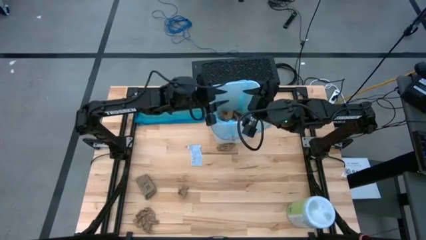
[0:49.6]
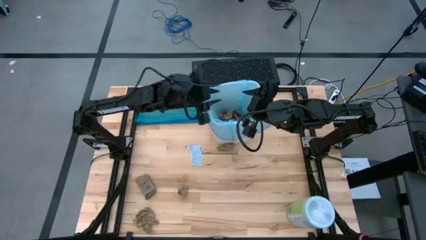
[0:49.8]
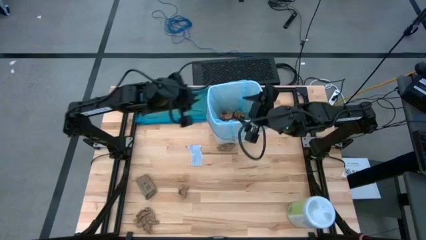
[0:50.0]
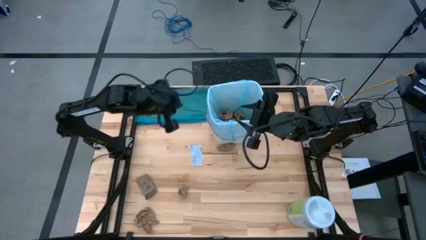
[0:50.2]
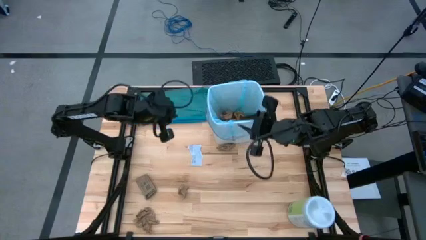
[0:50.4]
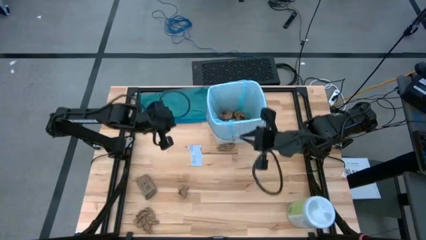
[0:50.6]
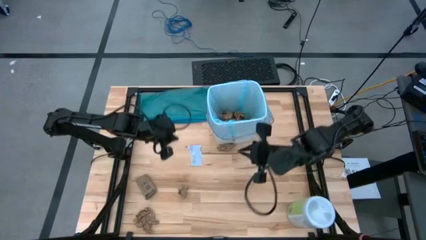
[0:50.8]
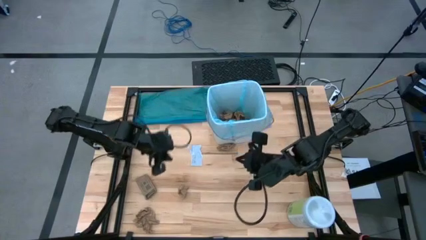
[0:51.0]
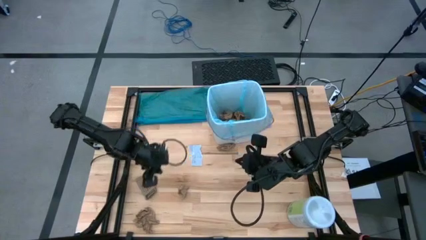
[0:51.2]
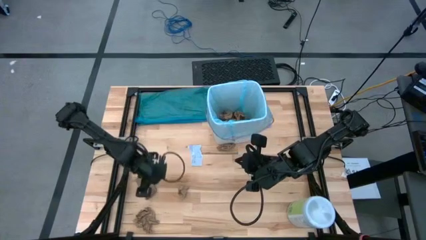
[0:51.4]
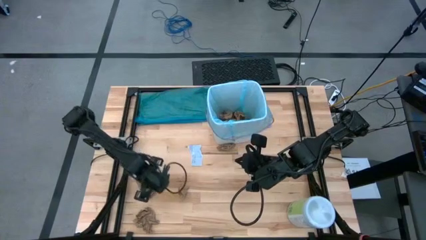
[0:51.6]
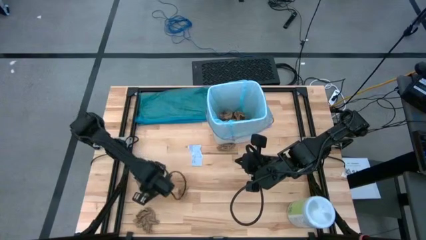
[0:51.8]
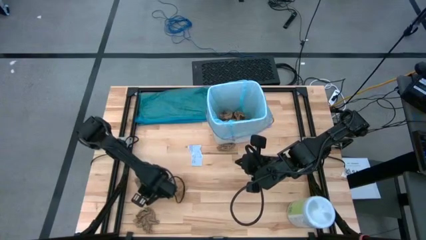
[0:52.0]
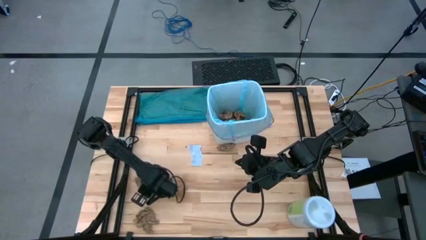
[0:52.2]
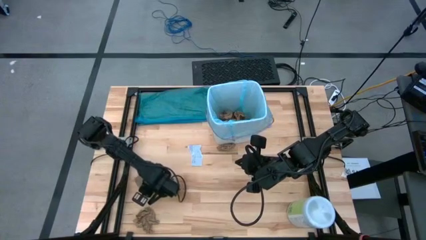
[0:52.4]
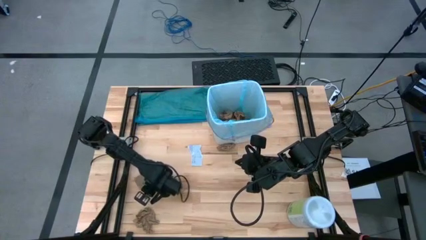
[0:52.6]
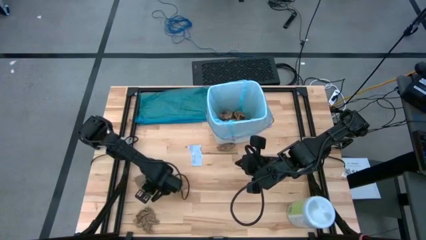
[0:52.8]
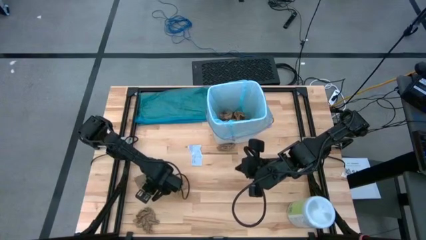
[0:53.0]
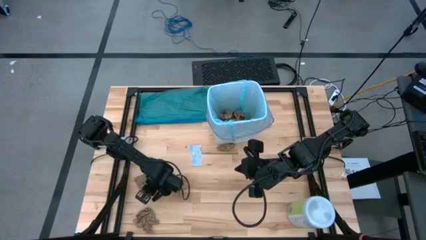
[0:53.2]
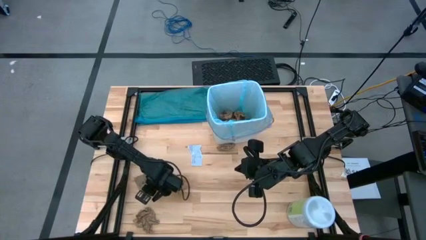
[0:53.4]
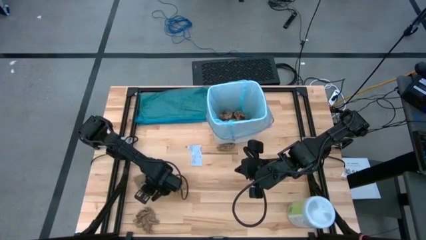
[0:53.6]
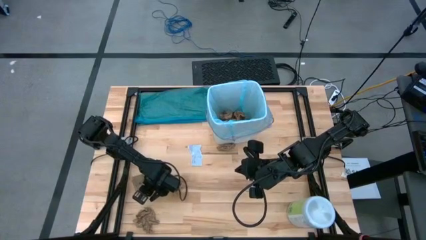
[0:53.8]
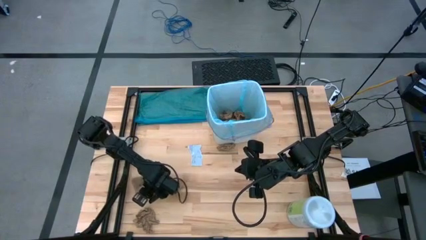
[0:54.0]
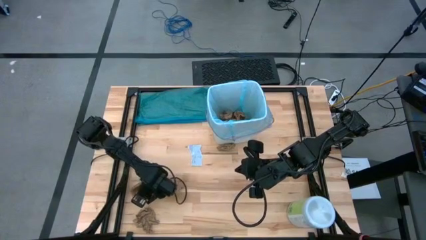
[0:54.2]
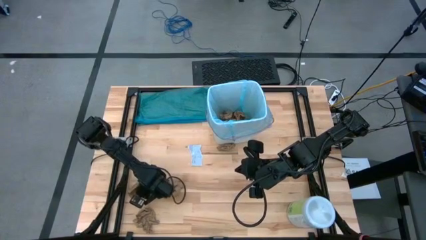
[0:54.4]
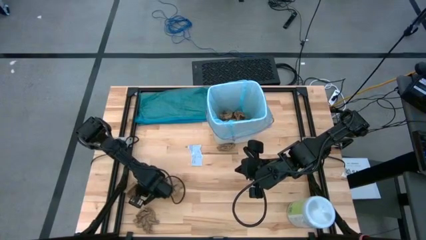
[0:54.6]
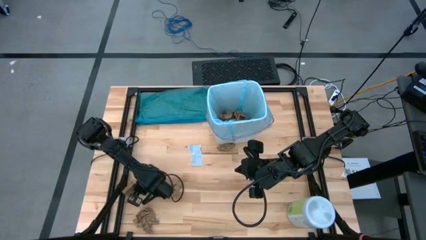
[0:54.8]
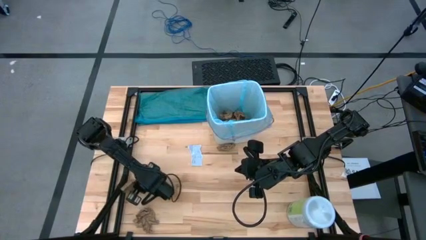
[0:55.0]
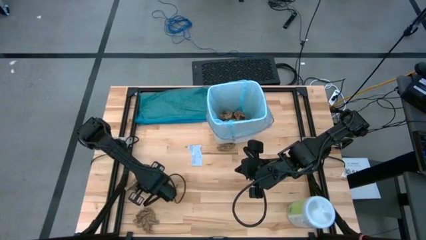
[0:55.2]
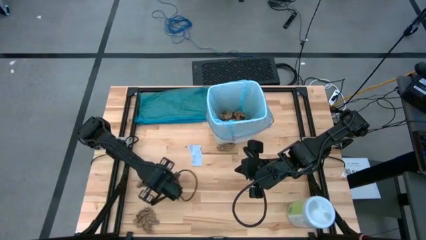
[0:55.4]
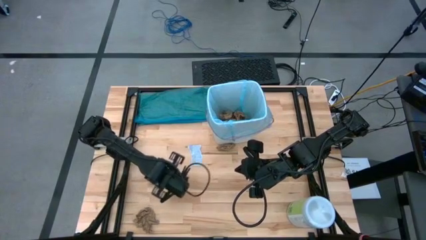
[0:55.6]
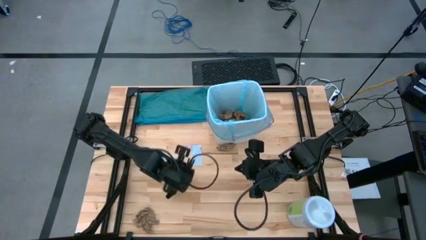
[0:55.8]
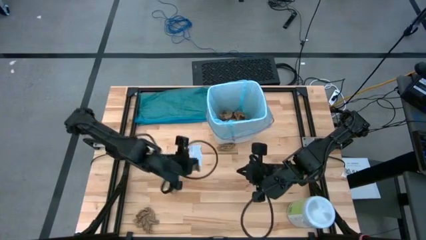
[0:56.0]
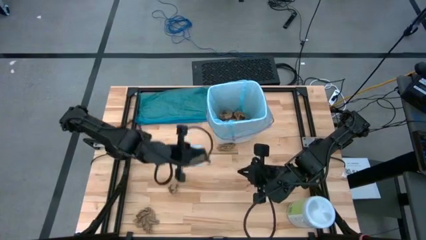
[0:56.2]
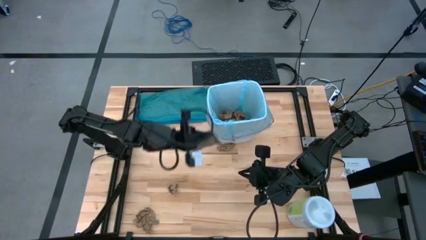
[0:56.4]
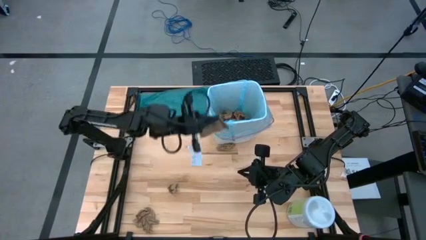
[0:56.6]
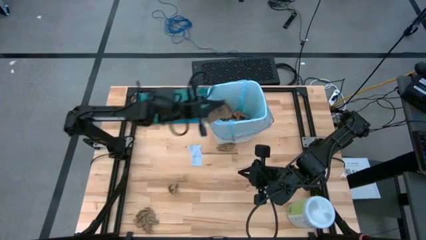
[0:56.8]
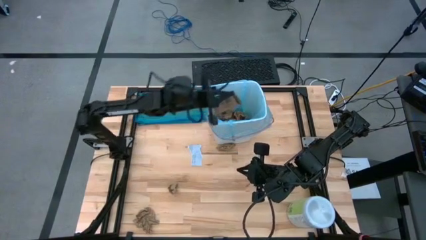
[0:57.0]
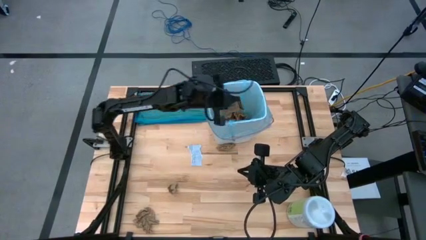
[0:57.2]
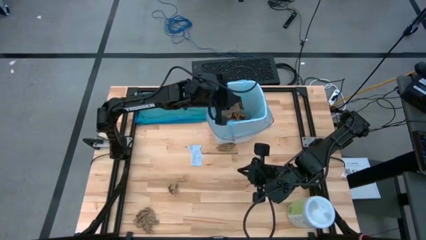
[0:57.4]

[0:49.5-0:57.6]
Task: place trash/remove bag and relplace
Put the brown cup sleeve into the blue trash bin

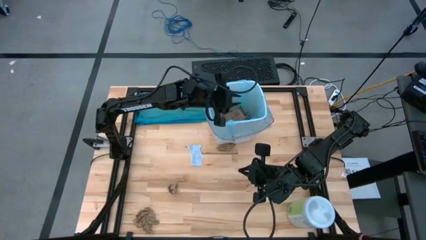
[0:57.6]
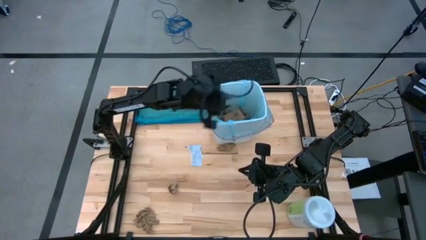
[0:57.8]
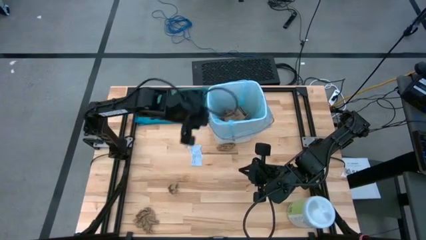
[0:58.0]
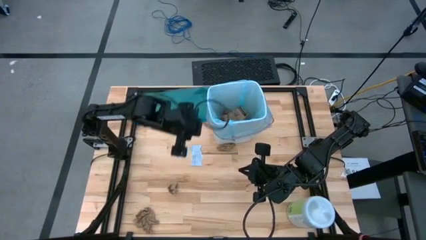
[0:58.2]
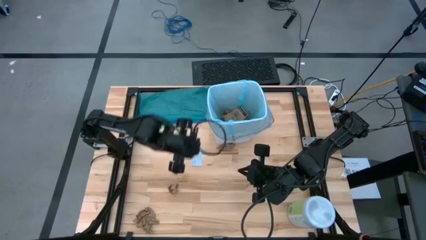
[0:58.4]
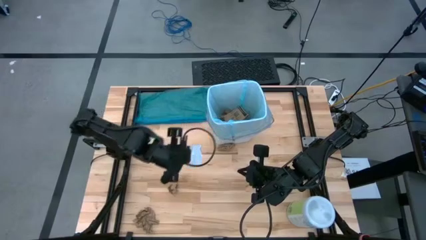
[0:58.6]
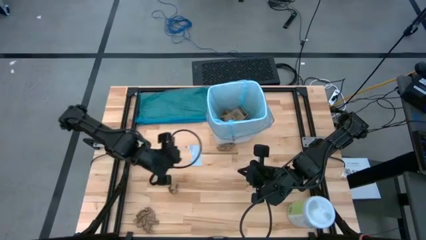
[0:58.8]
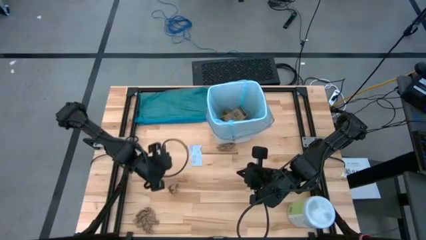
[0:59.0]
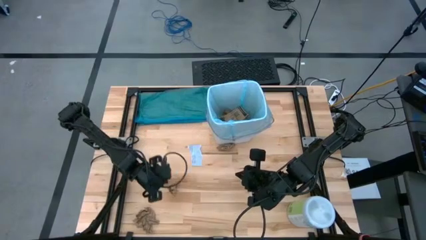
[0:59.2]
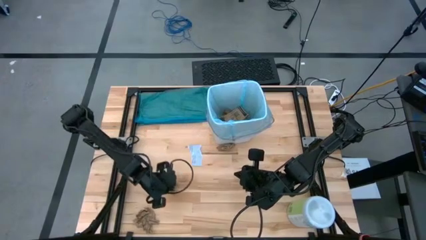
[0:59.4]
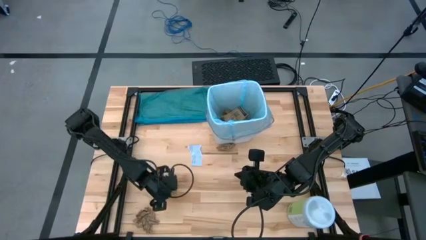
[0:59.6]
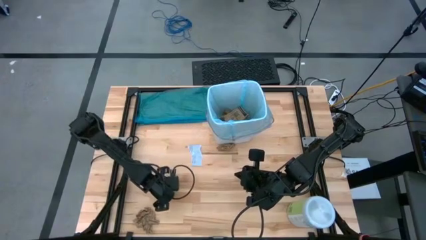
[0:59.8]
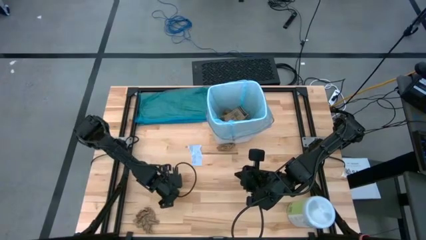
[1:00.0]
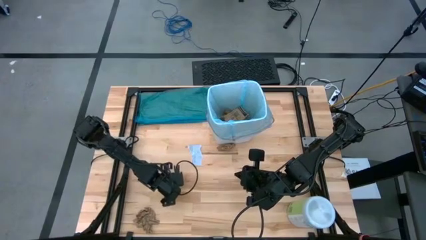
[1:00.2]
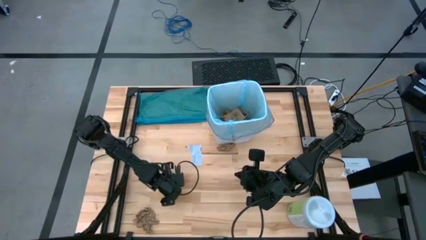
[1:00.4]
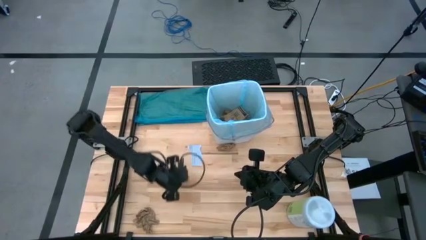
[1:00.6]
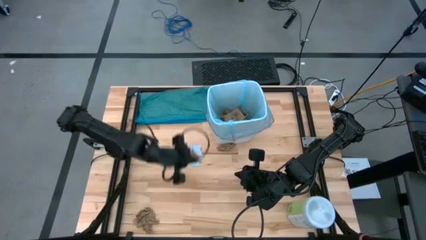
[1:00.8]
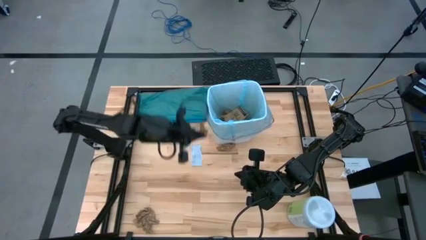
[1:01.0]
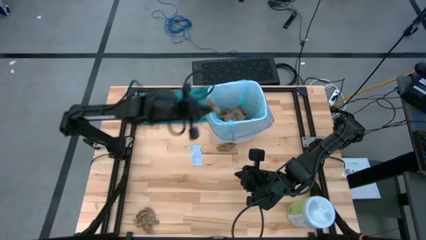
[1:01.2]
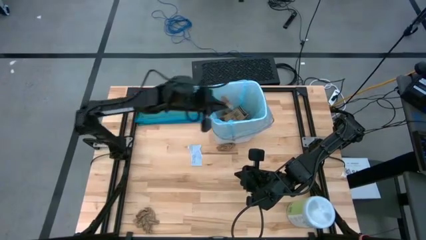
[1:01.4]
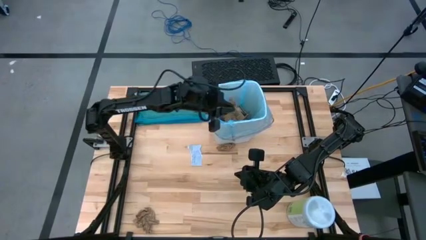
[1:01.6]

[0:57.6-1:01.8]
Put the brown napkin into the blue trash bin

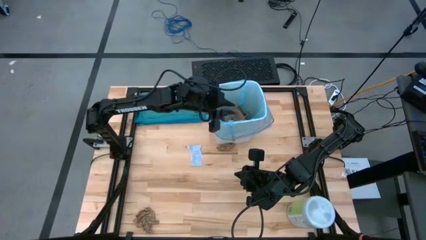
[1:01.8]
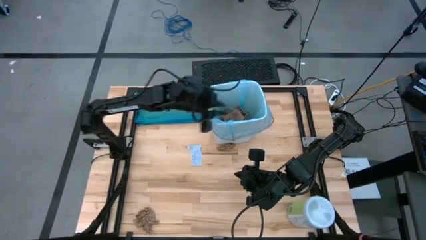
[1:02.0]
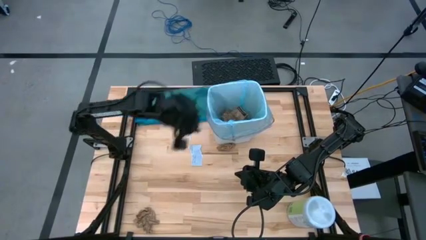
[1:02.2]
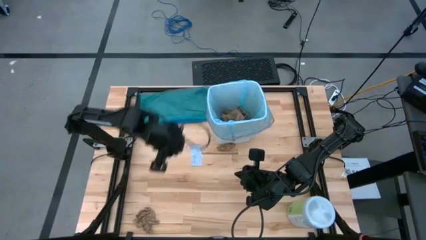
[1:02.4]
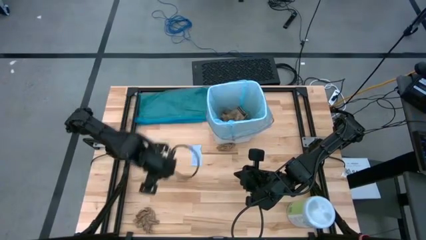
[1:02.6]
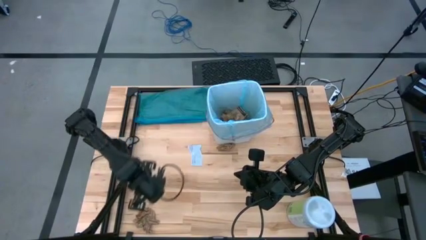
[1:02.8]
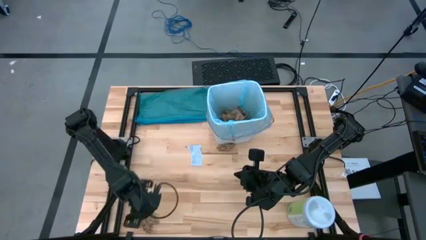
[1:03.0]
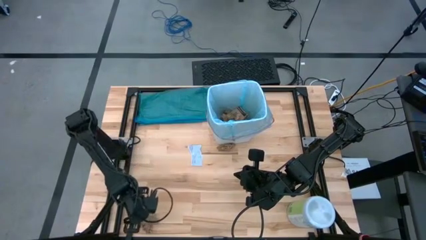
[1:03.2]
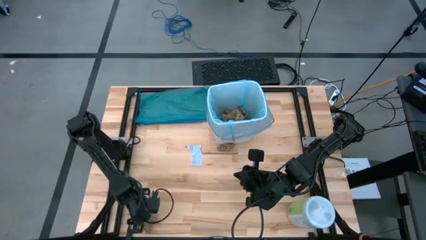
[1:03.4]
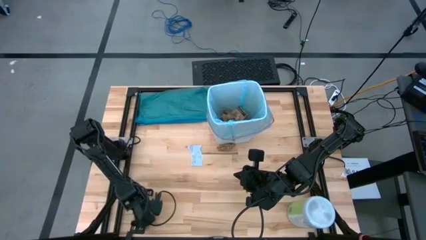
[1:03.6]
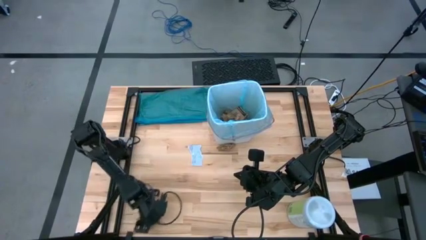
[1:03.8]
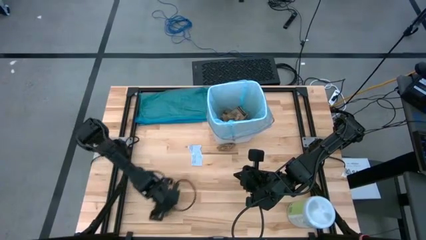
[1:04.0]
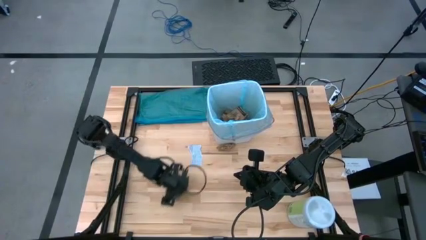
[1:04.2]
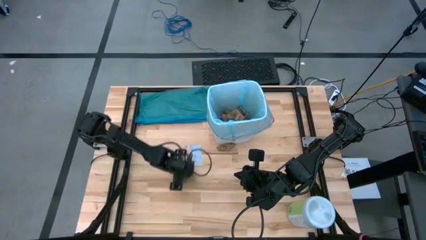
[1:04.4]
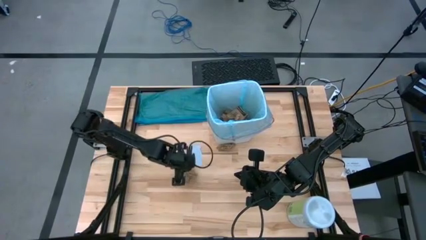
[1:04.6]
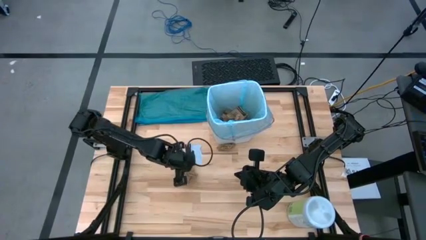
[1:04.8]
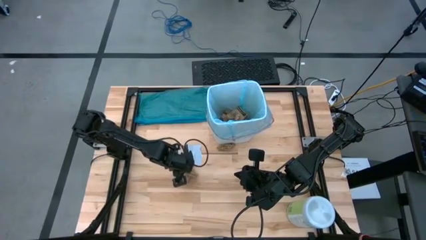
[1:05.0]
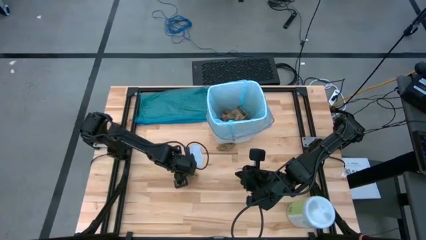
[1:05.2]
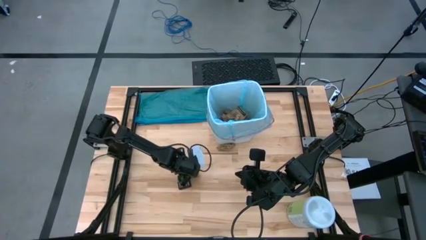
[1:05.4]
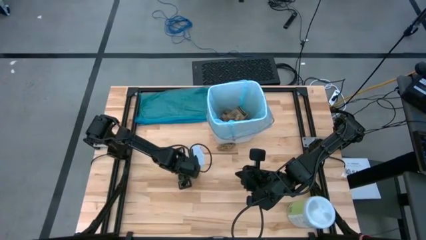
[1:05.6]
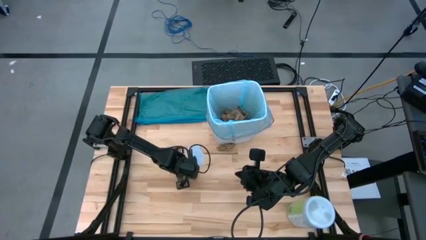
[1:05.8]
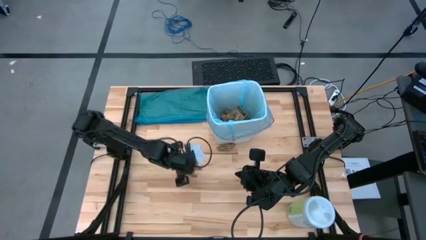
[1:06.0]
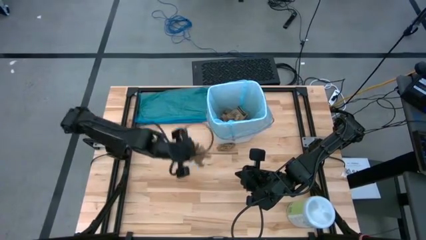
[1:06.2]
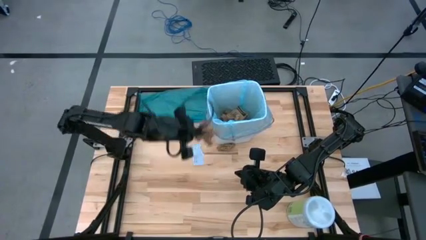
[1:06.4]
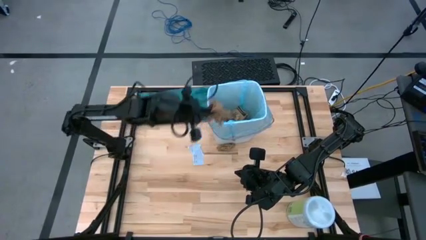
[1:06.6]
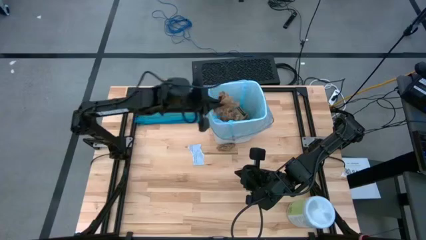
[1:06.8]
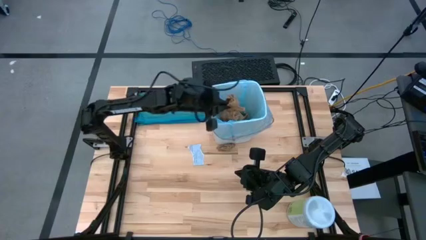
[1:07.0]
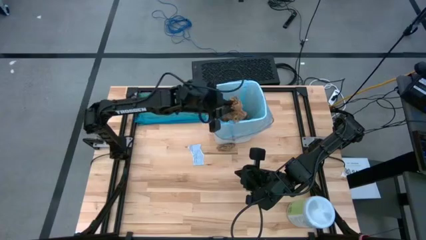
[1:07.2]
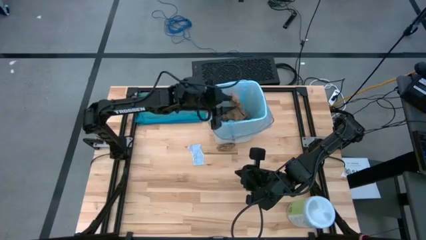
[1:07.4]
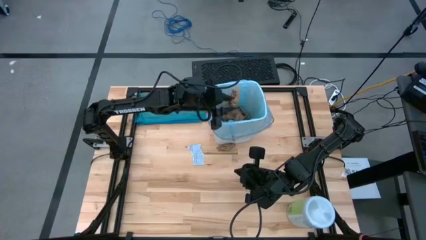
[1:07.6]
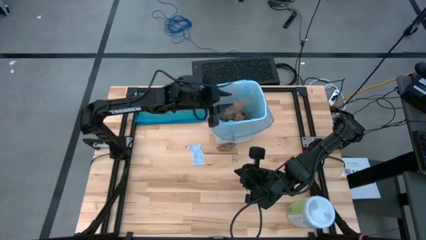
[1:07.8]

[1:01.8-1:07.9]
Put the brown napkin into the blue trash bin
